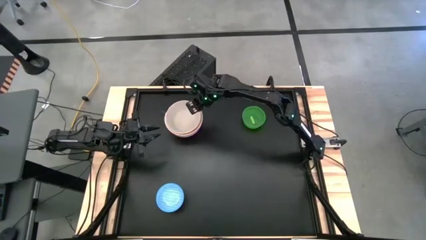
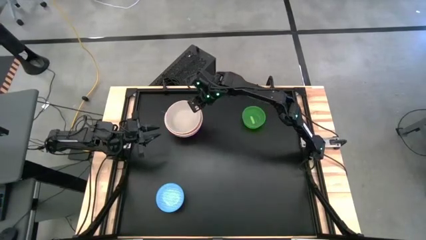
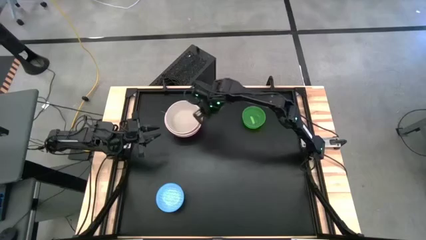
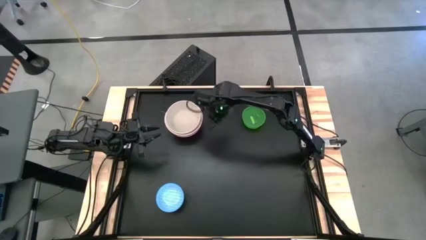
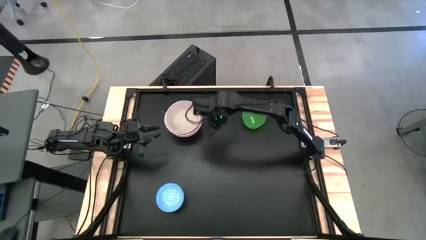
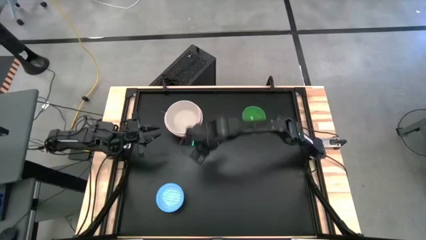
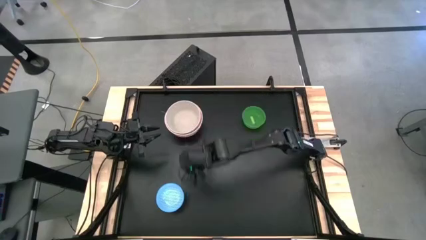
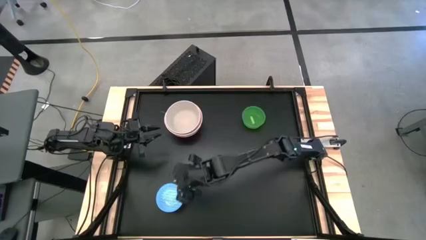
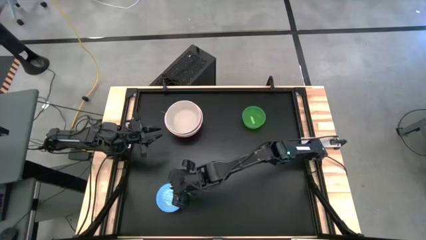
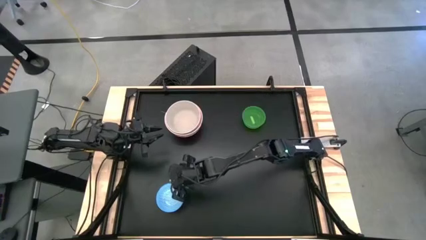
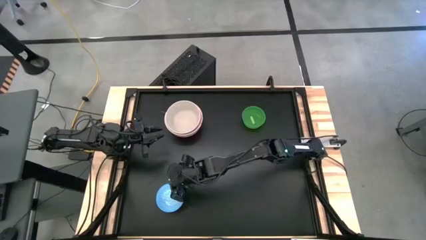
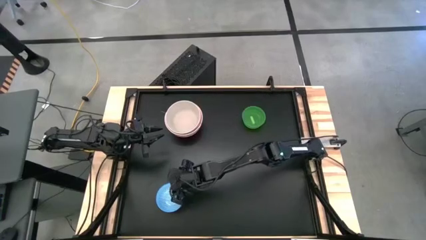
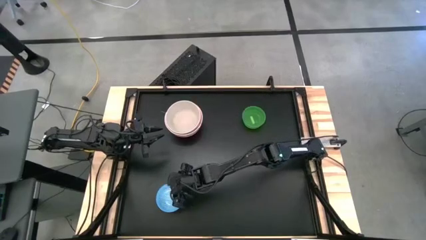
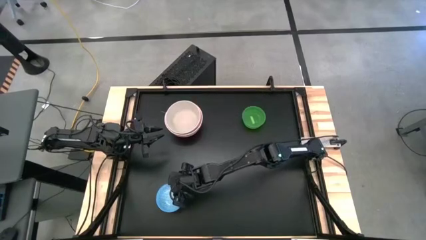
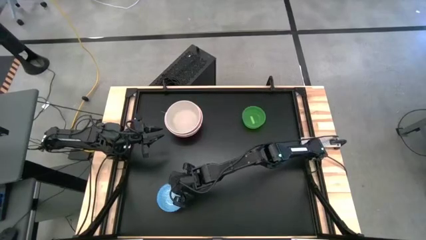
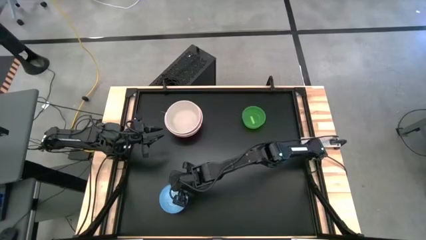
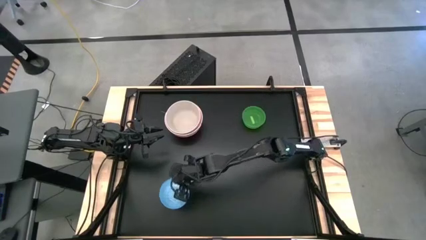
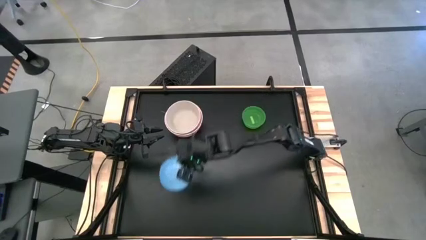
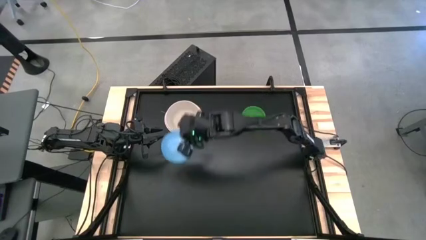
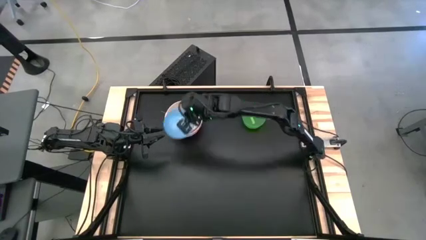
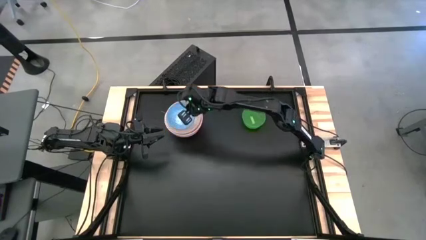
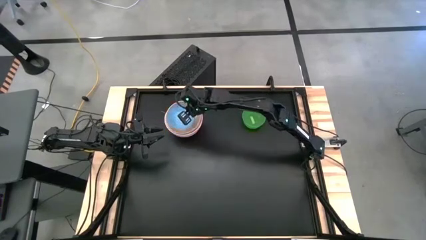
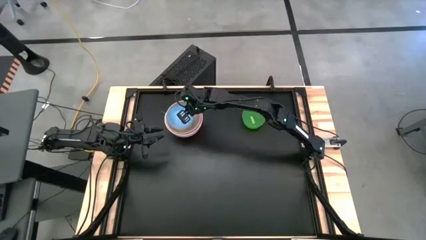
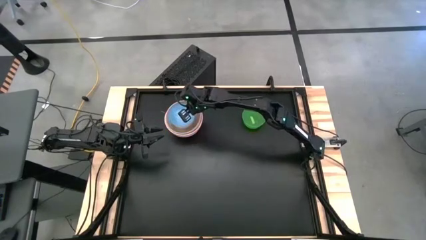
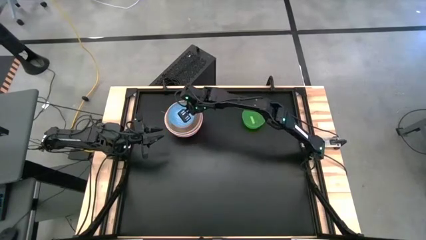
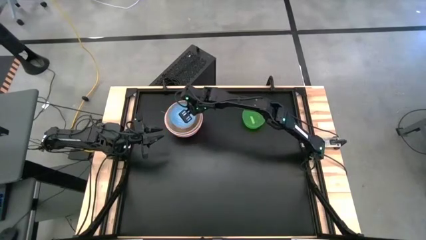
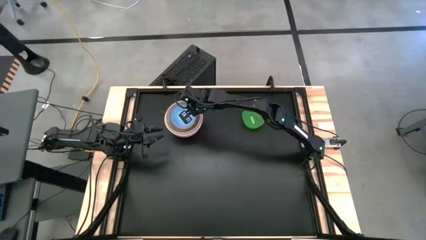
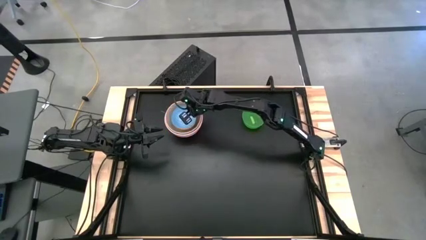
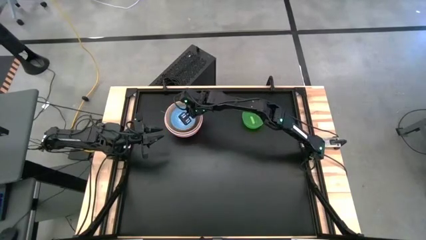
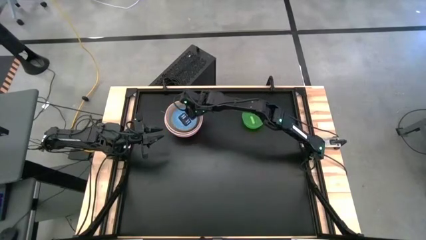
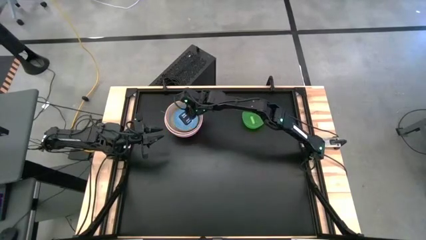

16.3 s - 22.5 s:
Stack the blue bowl on top of the gray bowl

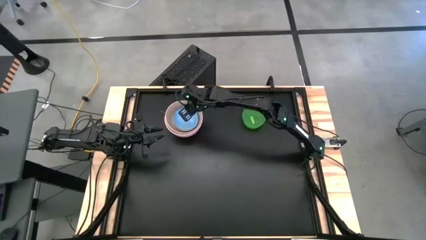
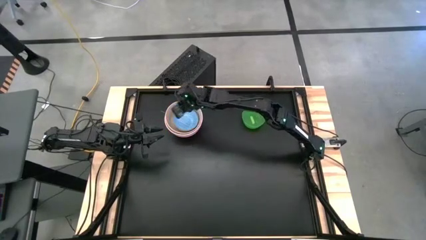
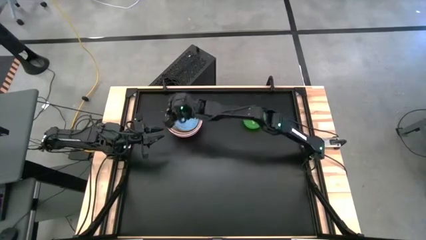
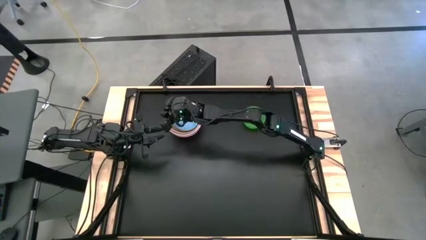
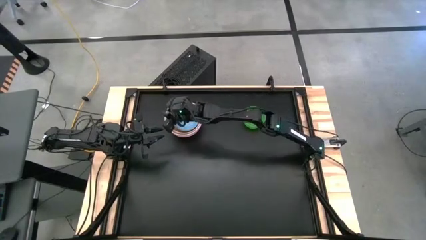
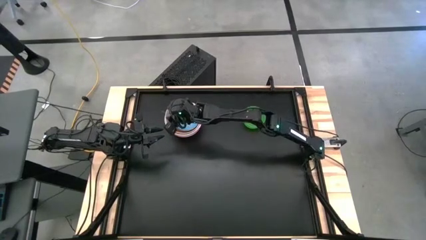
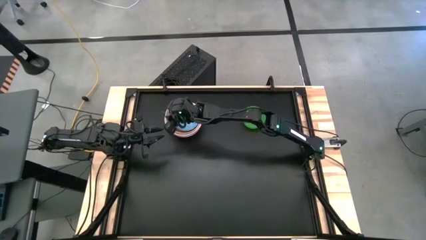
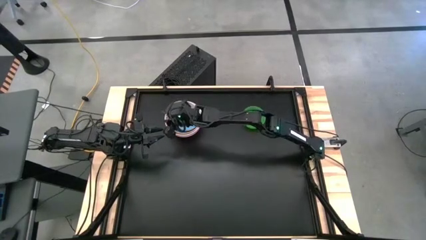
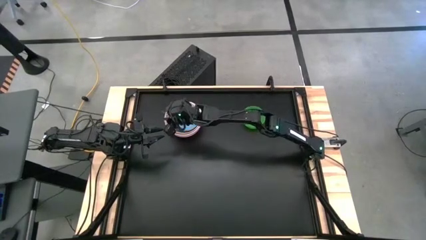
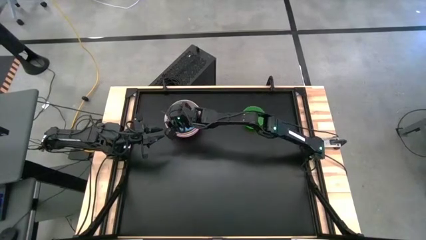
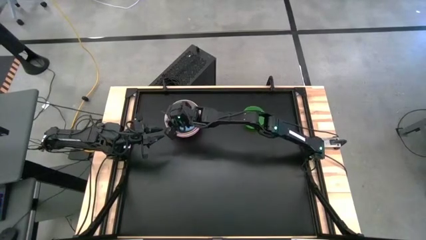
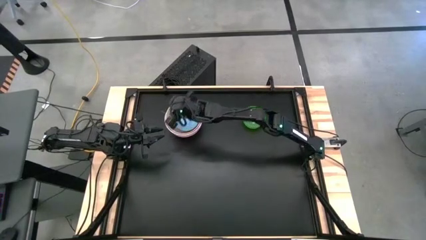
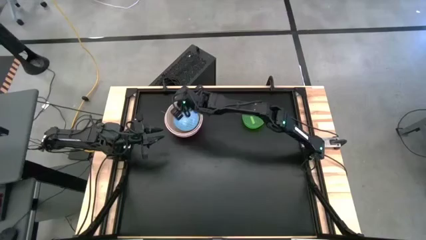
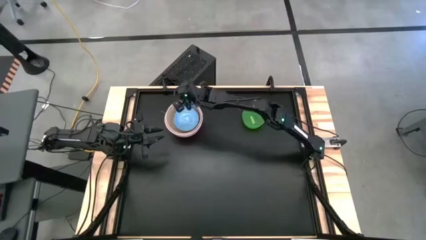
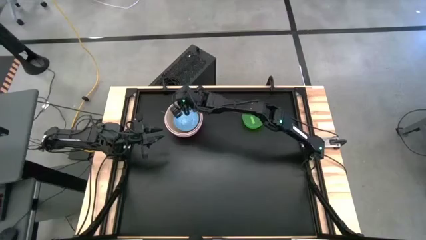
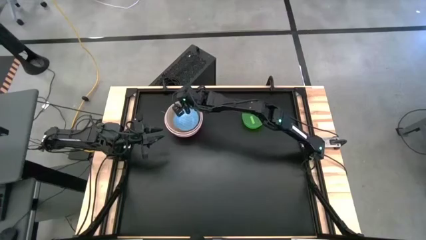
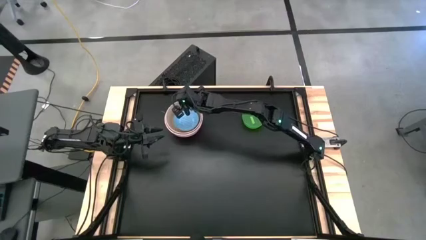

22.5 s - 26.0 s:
Adjust the stacked bowls on the table

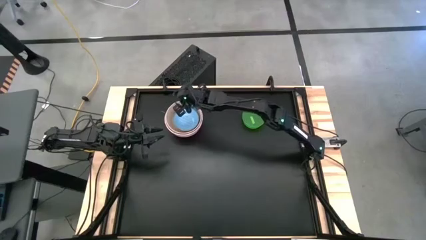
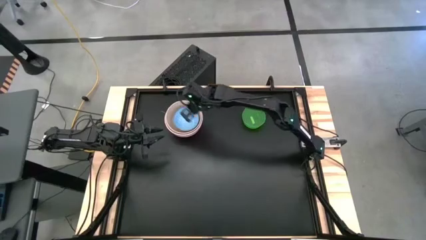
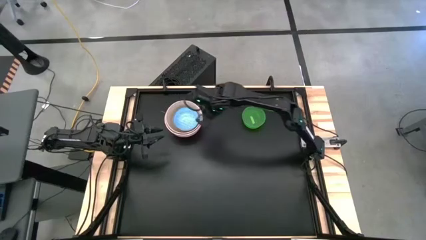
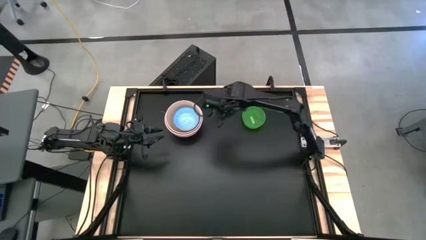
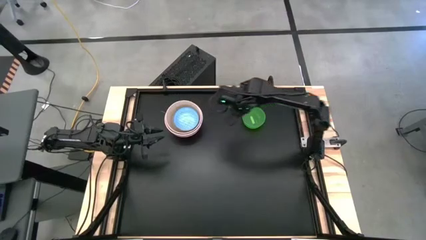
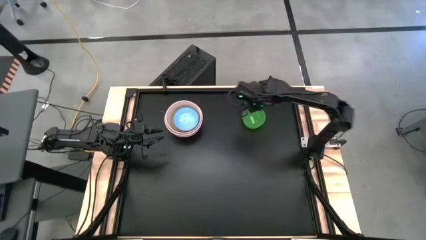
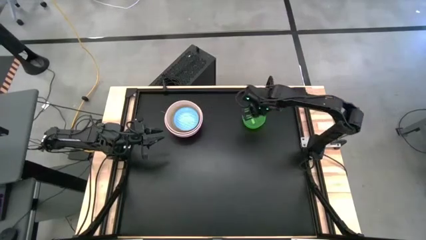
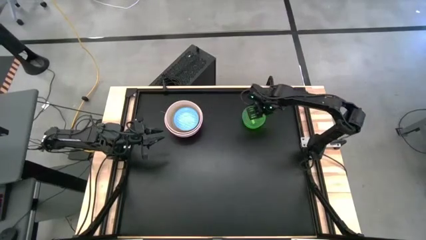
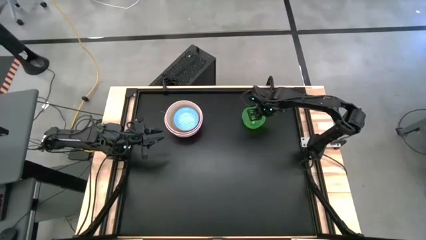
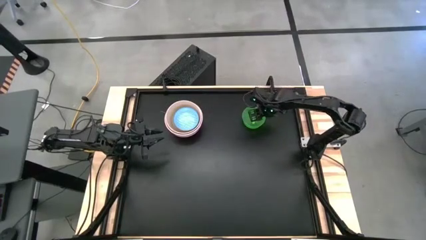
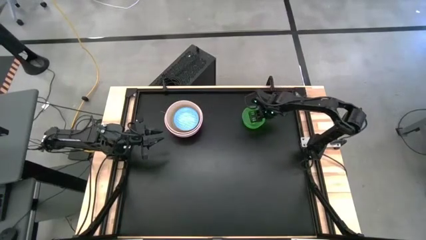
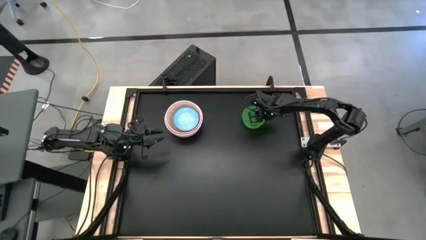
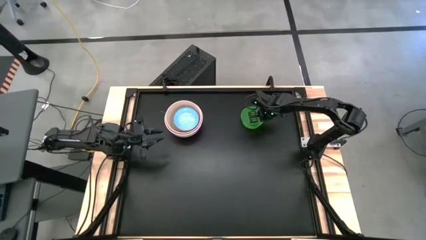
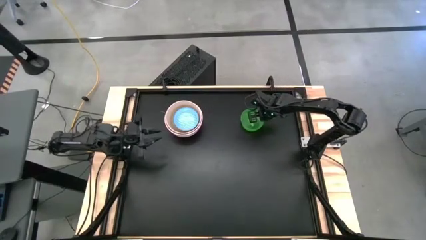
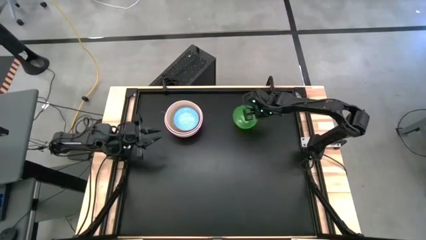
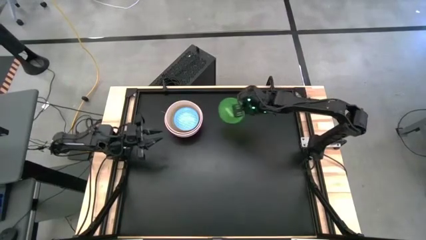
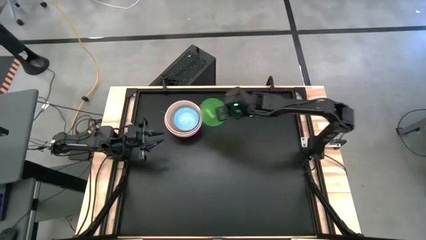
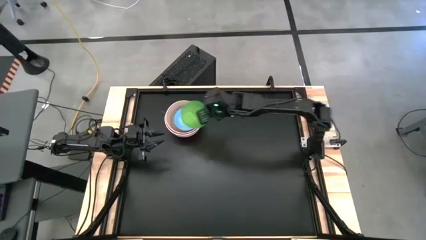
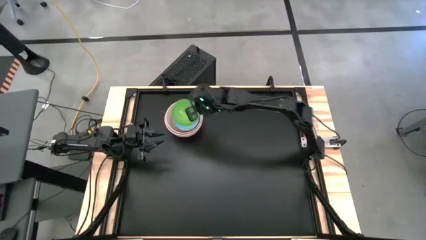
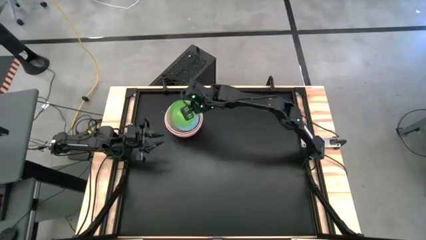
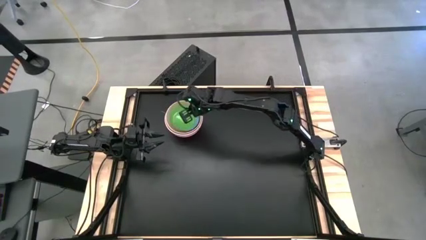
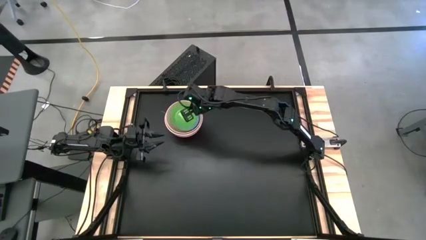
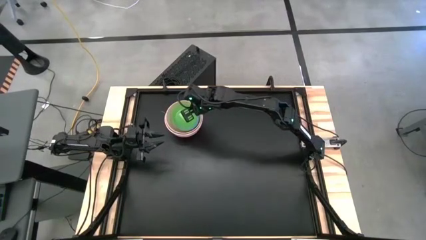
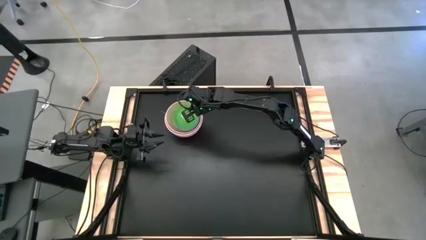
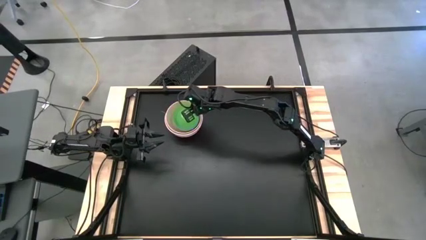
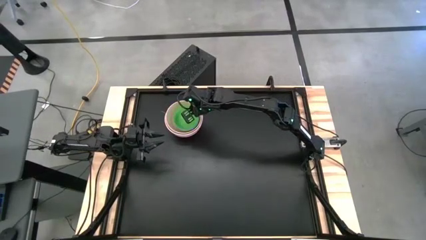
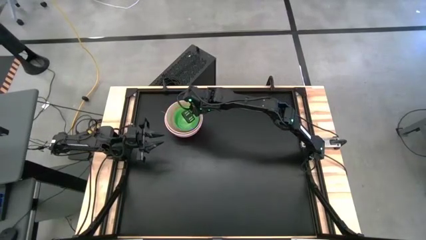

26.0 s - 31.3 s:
Stack the green bowl on top of the blue bowl
